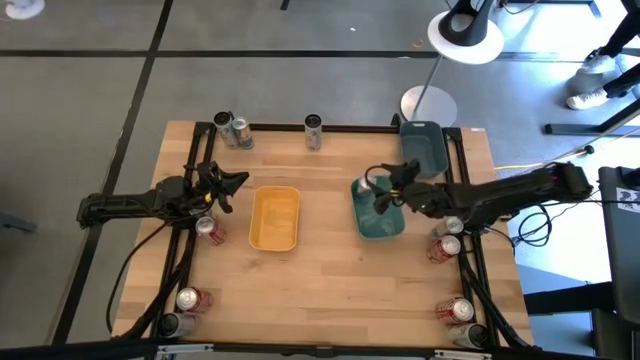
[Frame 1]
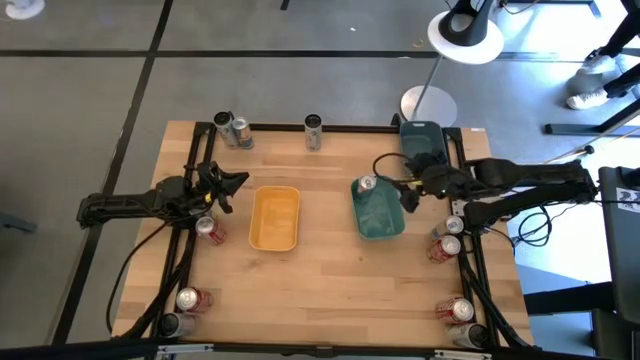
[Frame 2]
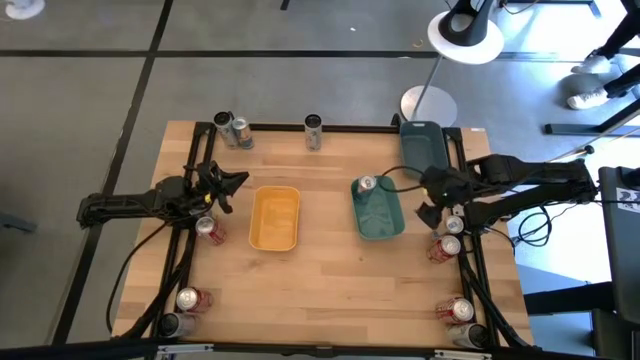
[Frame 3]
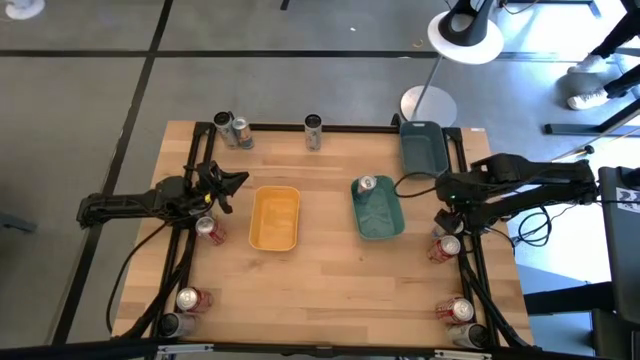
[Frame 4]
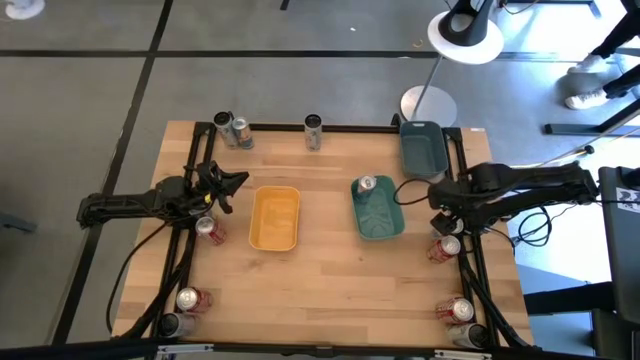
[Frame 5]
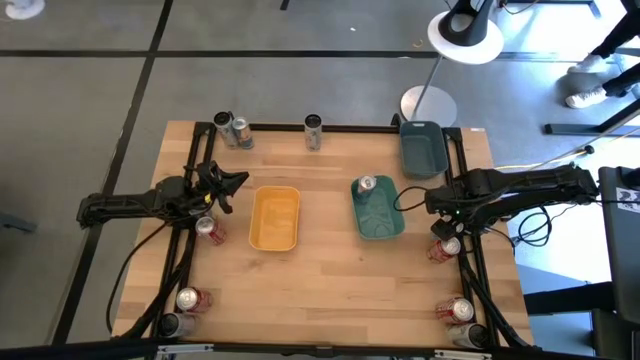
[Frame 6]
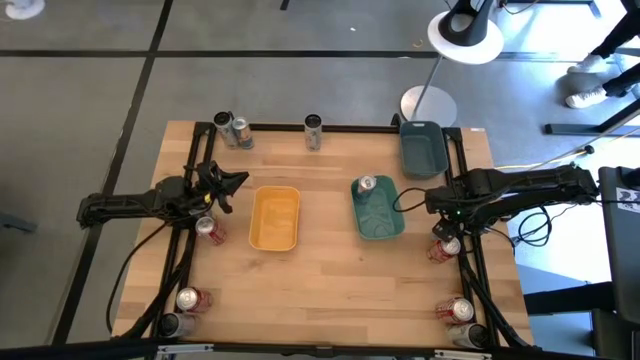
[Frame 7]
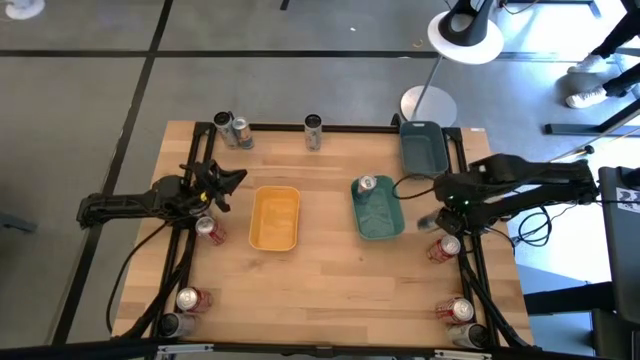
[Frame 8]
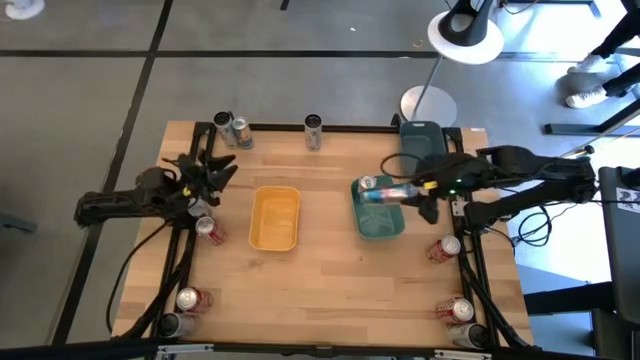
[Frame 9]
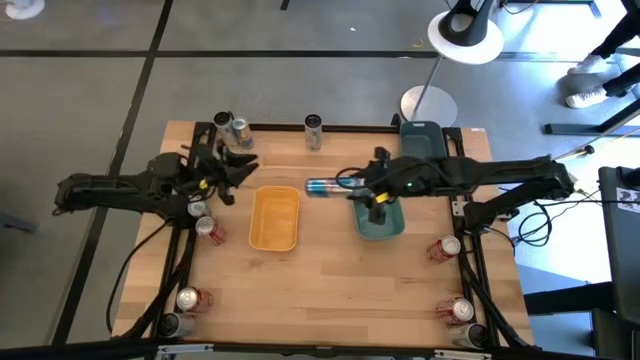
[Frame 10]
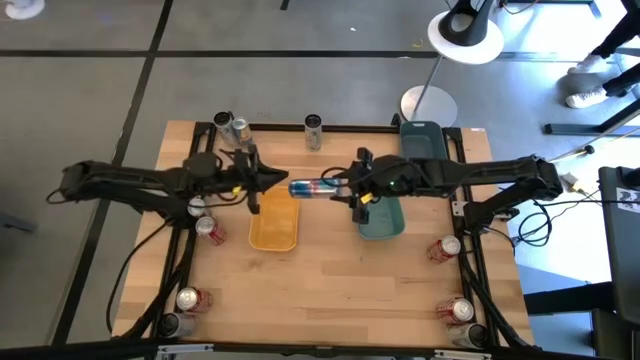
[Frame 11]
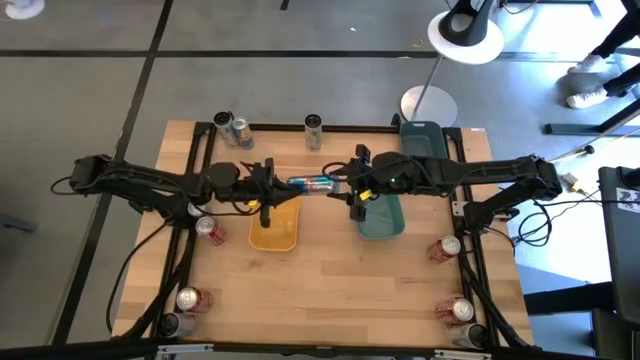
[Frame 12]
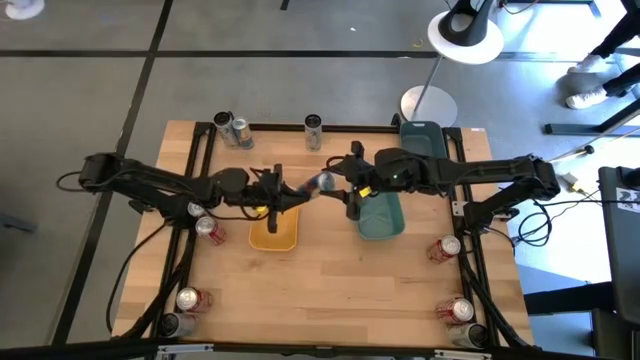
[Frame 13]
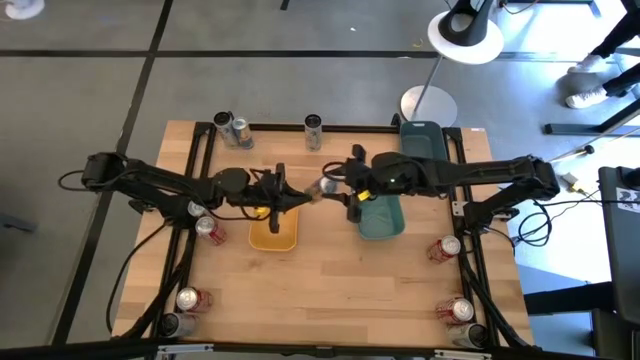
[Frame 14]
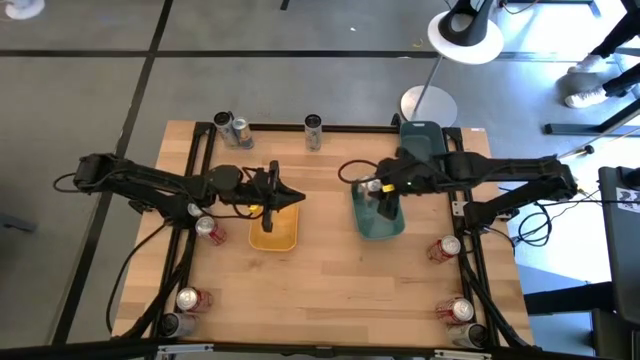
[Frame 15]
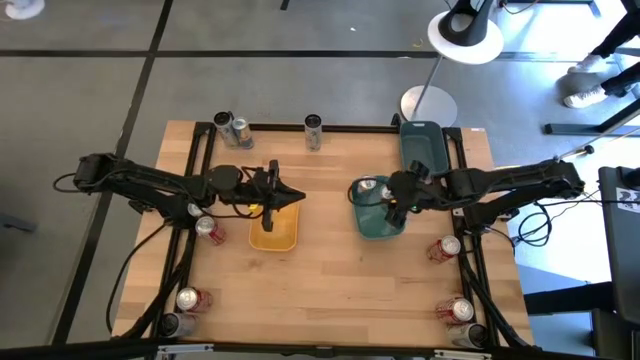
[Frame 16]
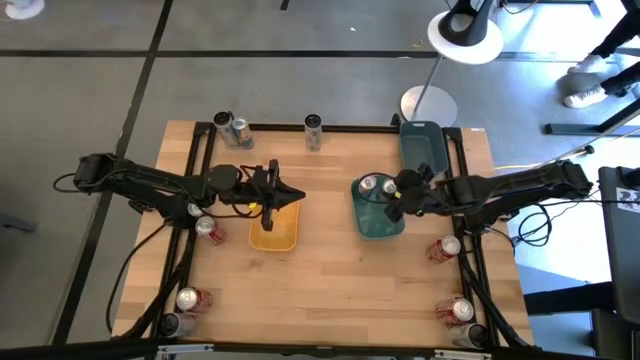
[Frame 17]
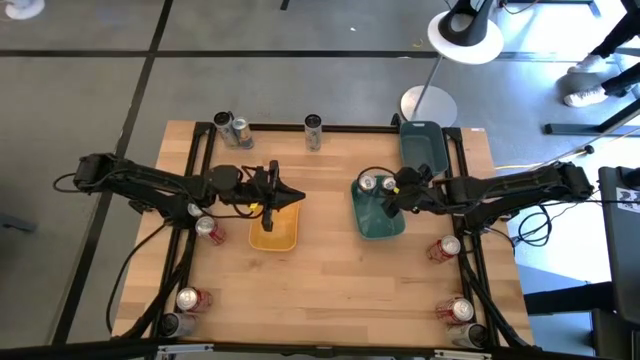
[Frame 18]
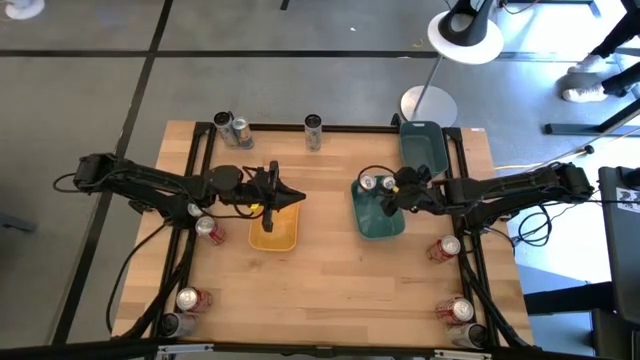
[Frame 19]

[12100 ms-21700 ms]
Task: Sort soda cans
Put the bottom right blue soda can into the green bin

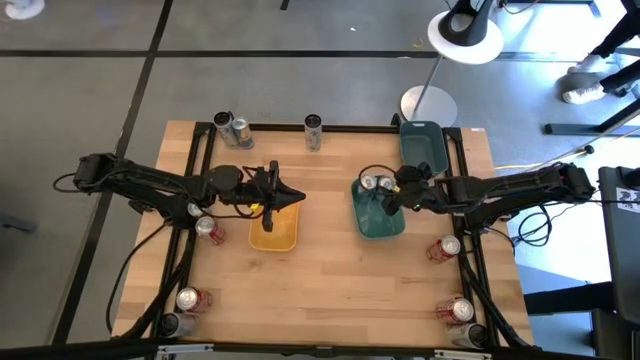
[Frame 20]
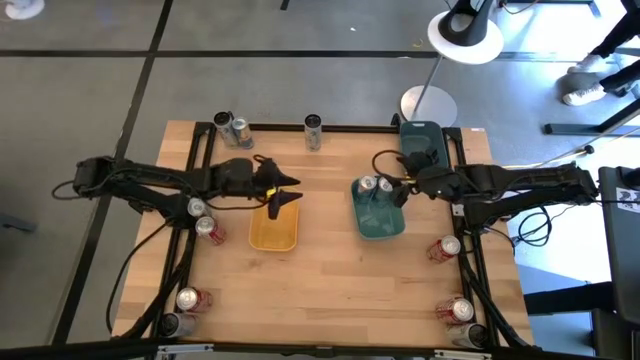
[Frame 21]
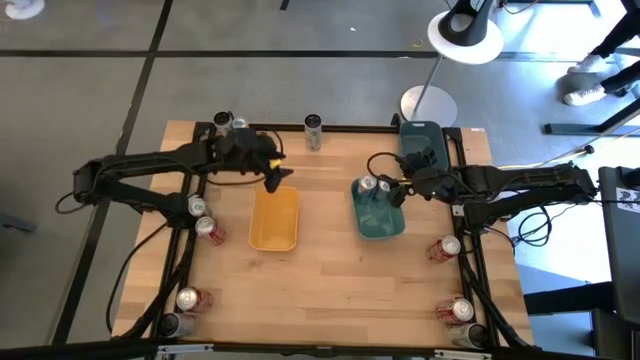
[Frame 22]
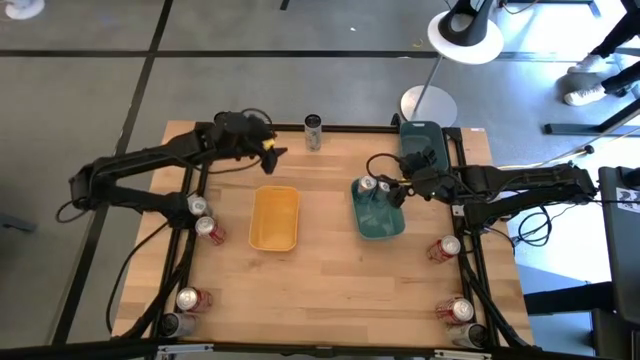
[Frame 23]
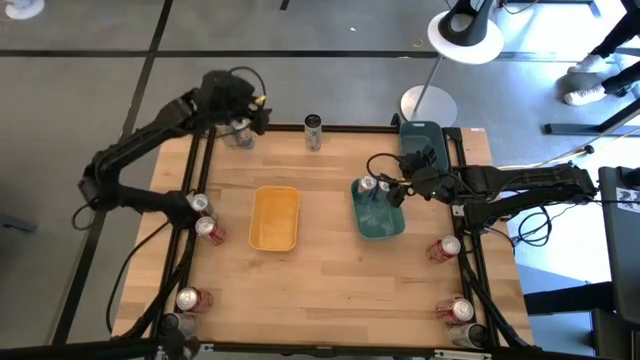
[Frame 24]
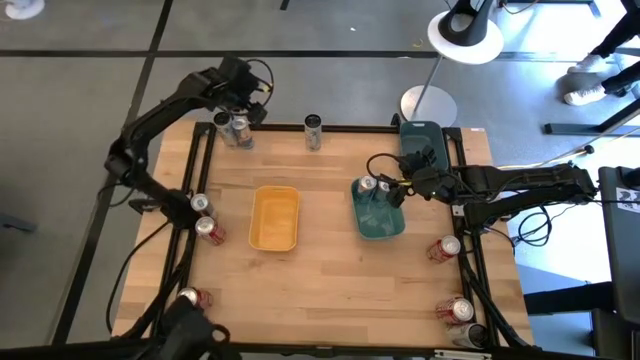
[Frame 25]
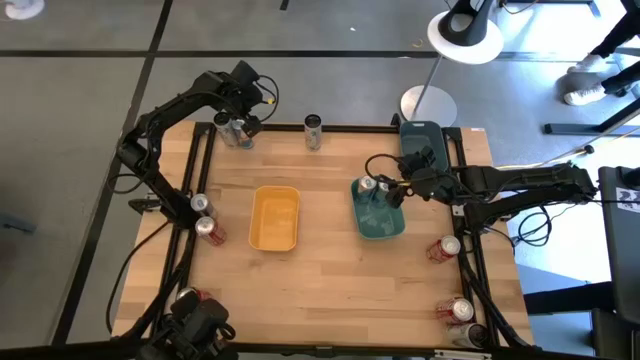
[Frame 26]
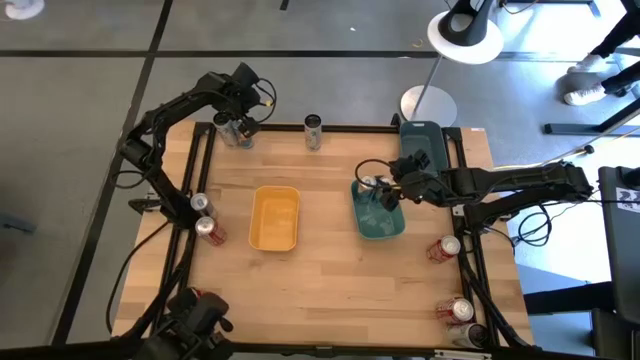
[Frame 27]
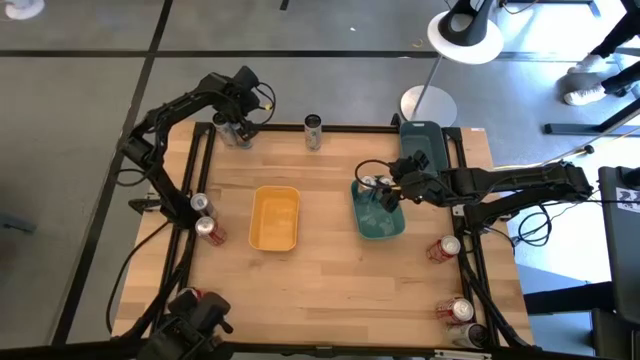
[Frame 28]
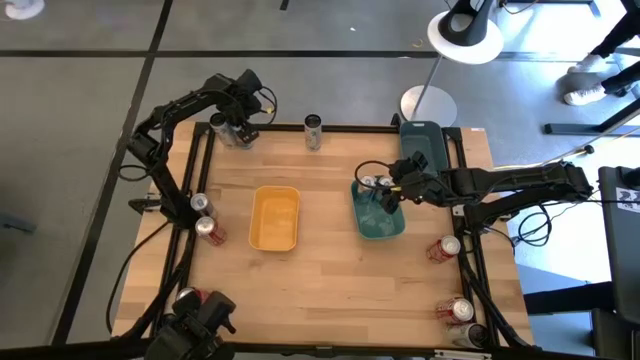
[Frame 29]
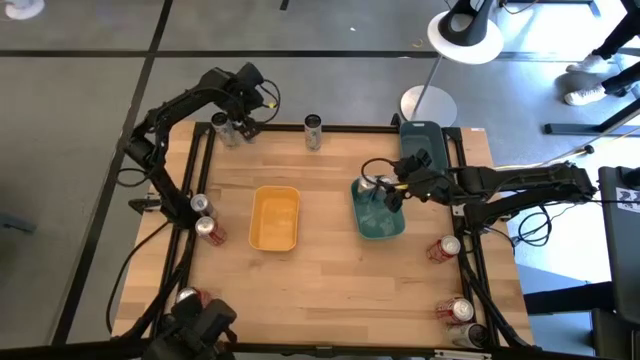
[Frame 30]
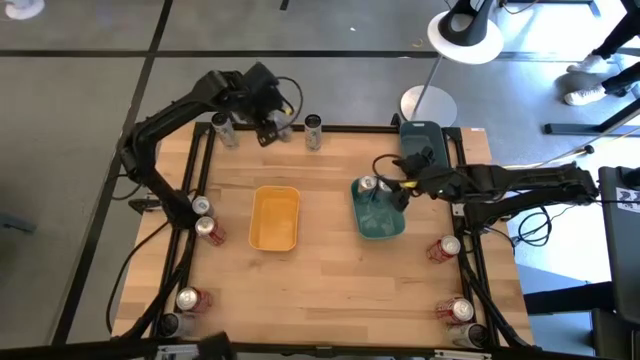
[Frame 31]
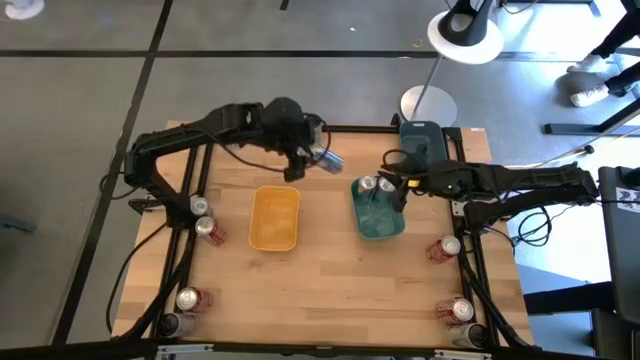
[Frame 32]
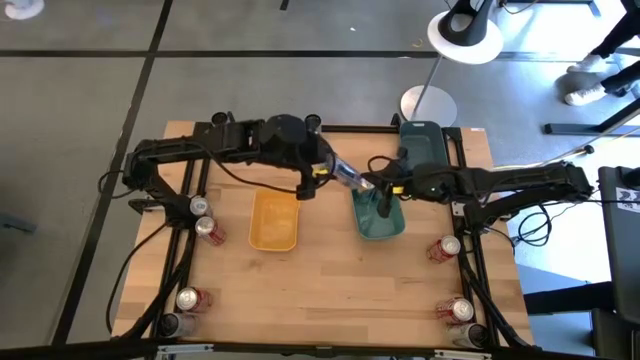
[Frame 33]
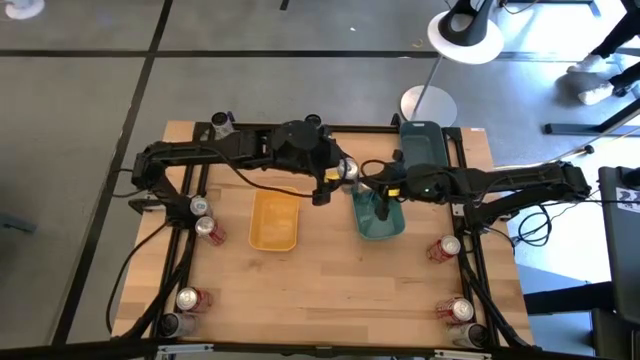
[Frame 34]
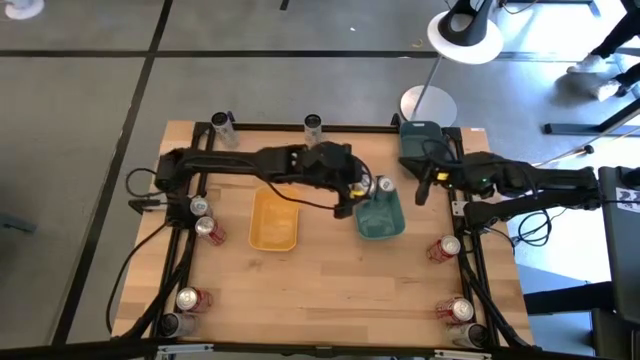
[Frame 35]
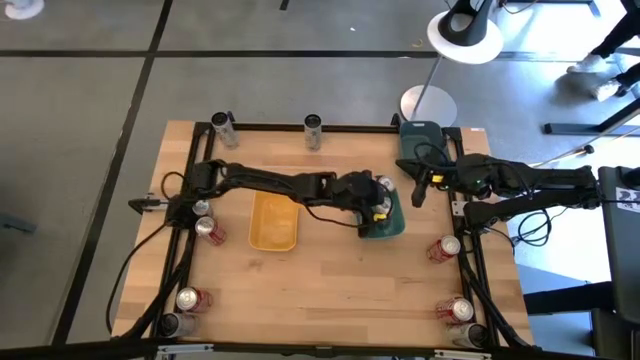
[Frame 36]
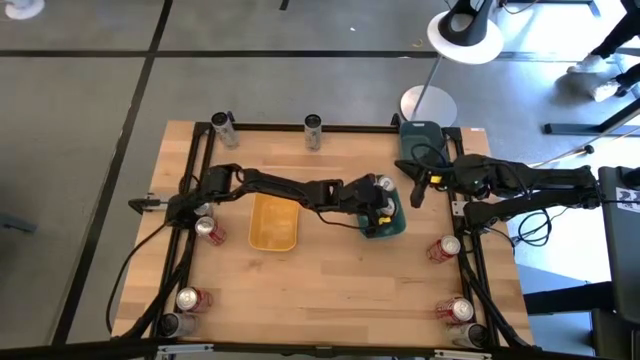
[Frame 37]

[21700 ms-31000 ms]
Put the top blue soda can into the green bin

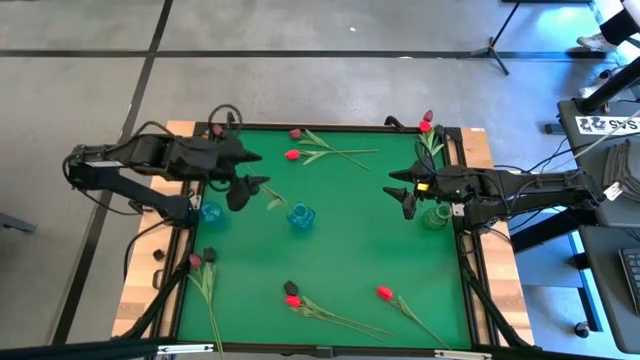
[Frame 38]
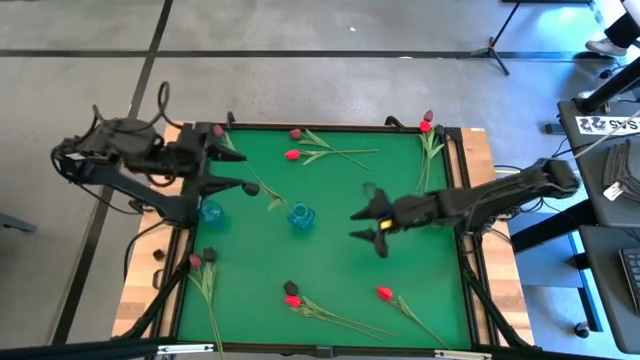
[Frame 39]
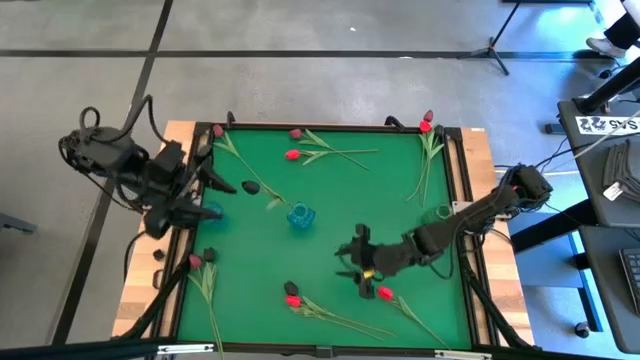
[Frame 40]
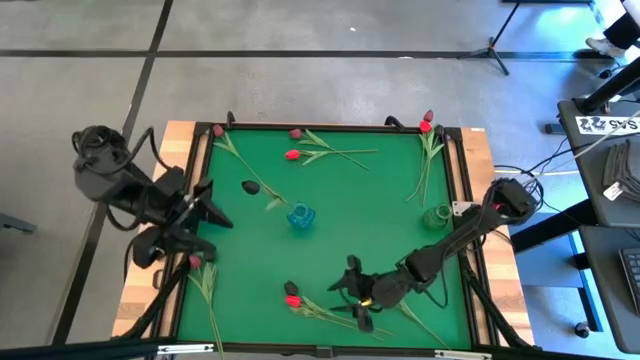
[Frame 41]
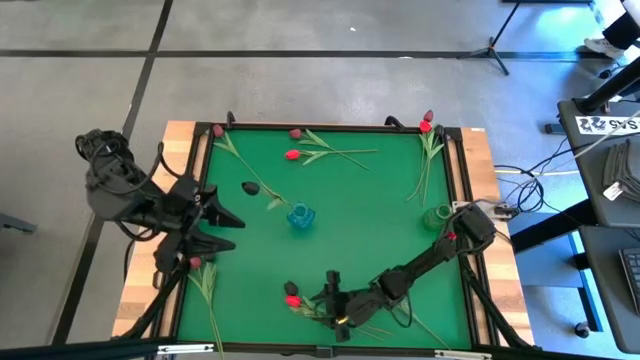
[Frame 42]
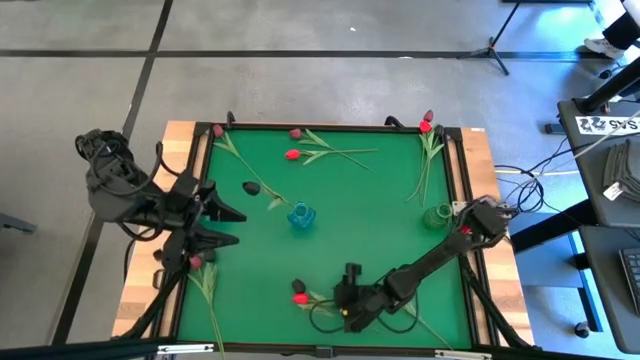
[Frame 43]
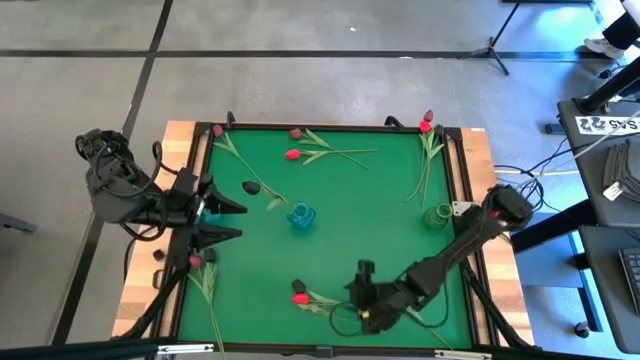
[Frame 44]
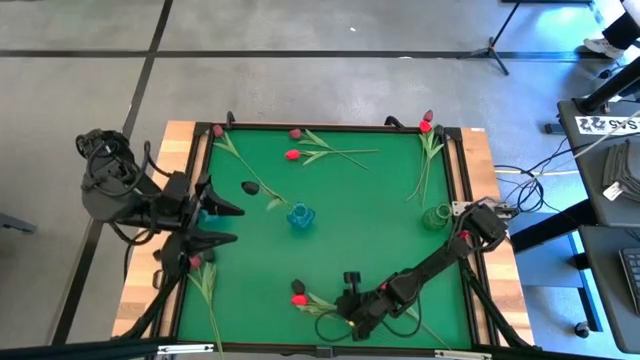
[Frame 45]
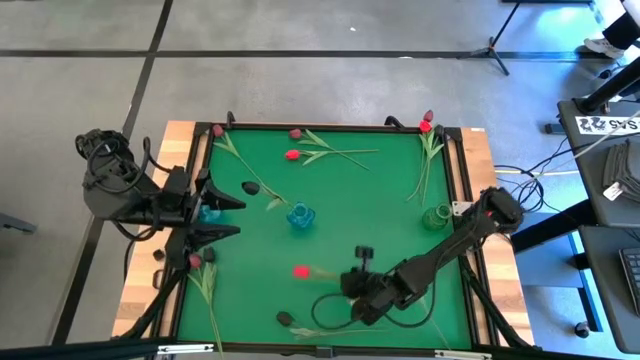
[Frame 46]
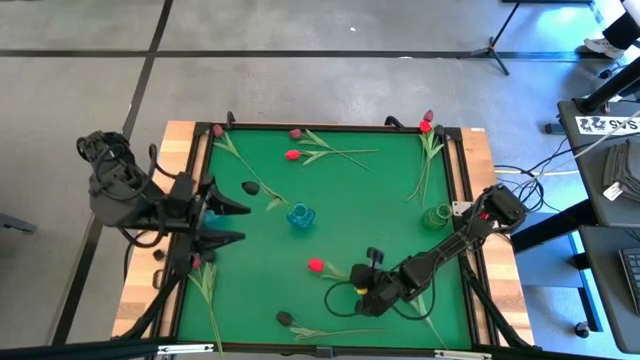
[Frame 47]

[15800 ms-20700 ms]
Task: Sort flowers into vase by color
Move the bottom left red tulip to the center of the table
